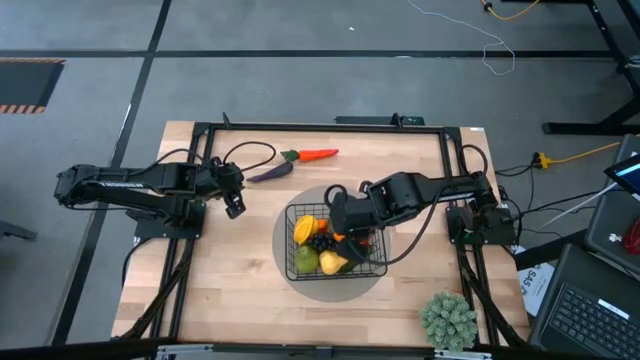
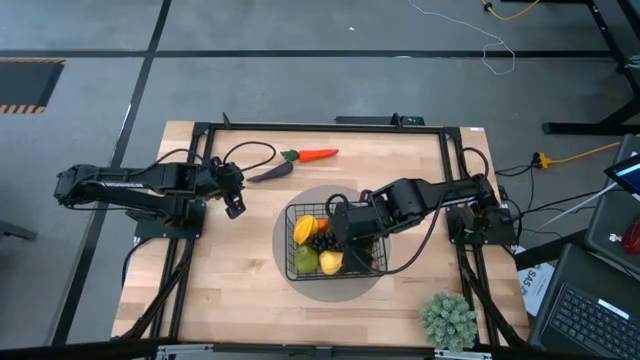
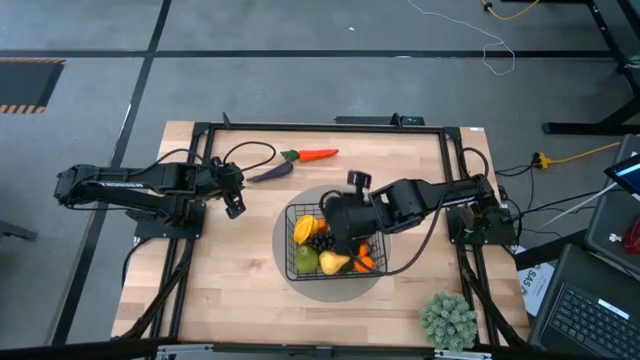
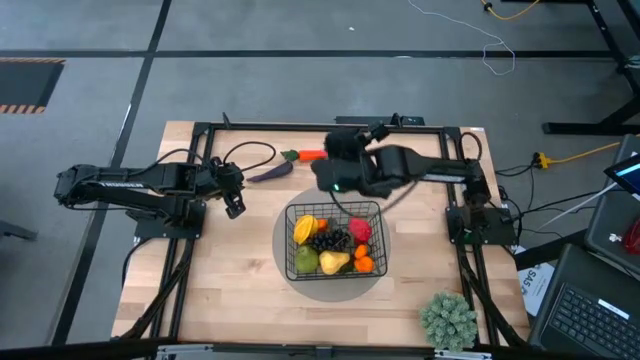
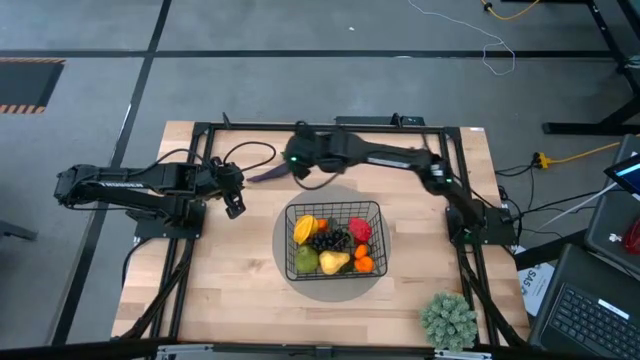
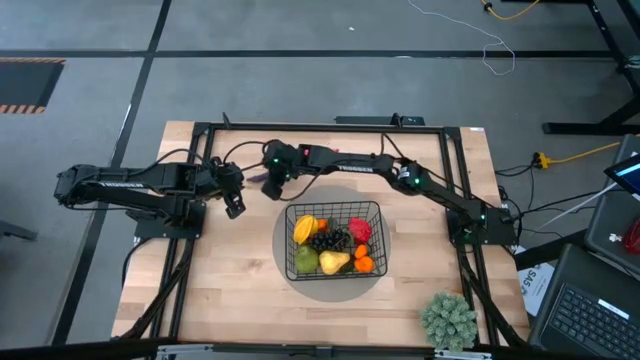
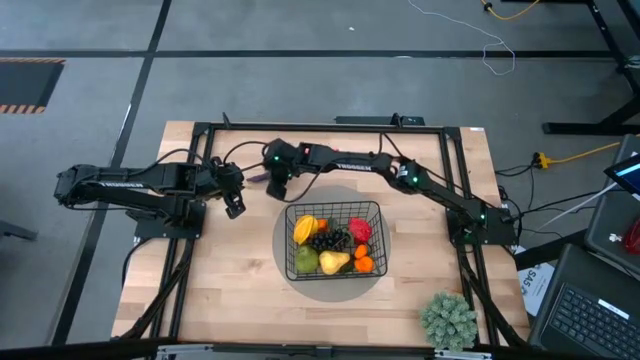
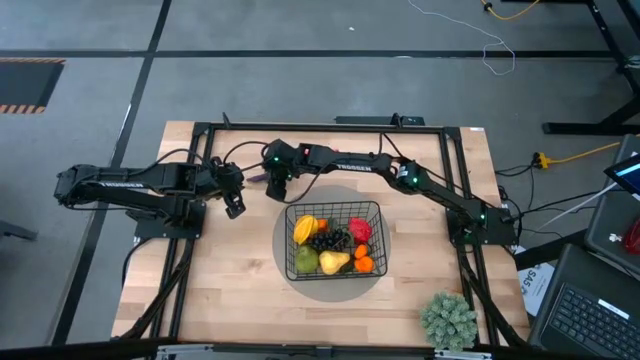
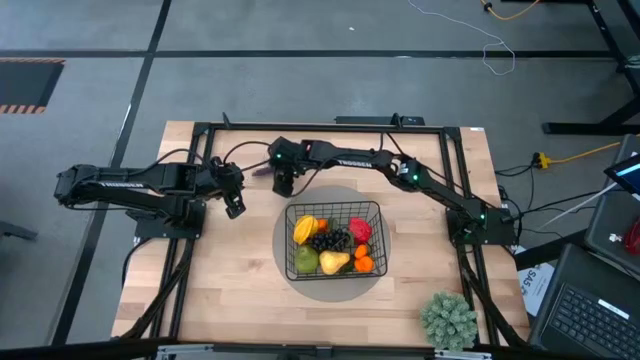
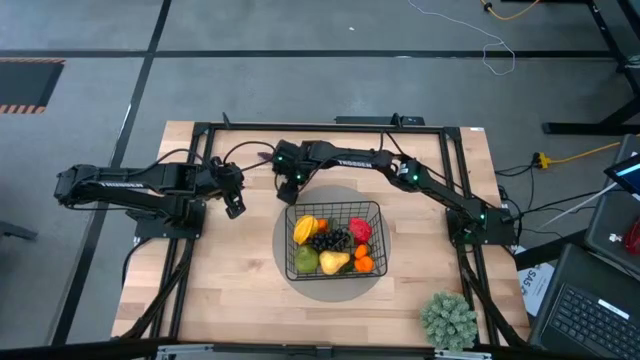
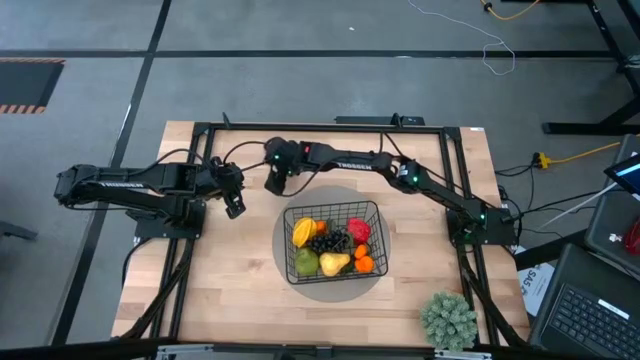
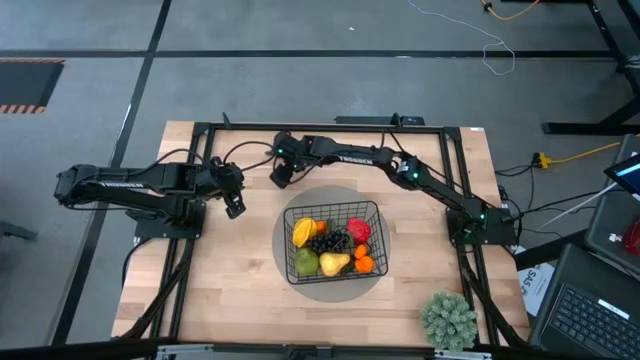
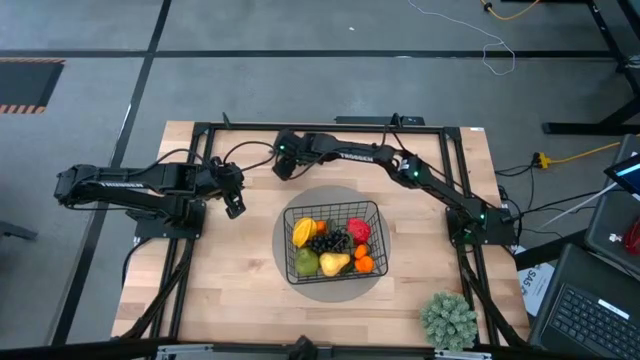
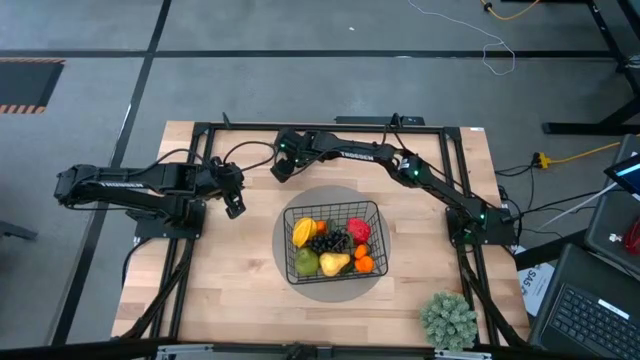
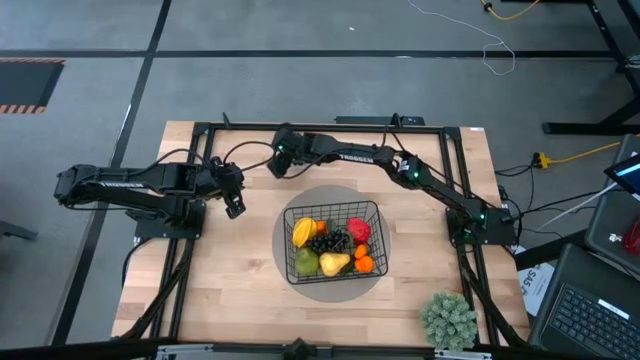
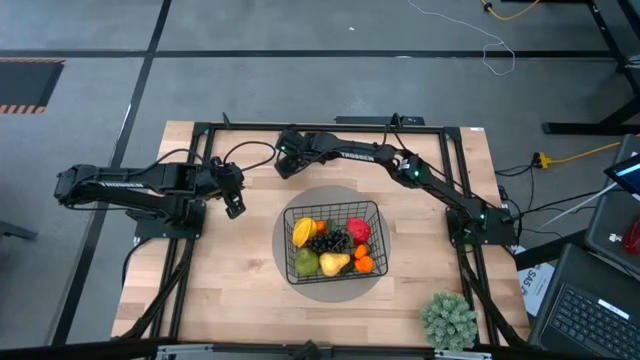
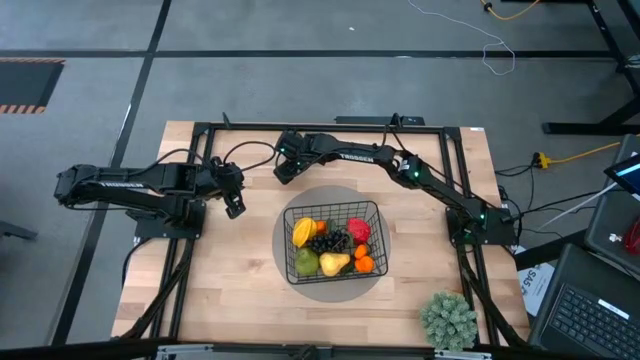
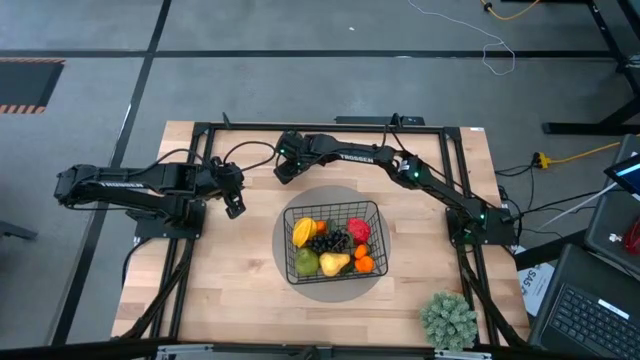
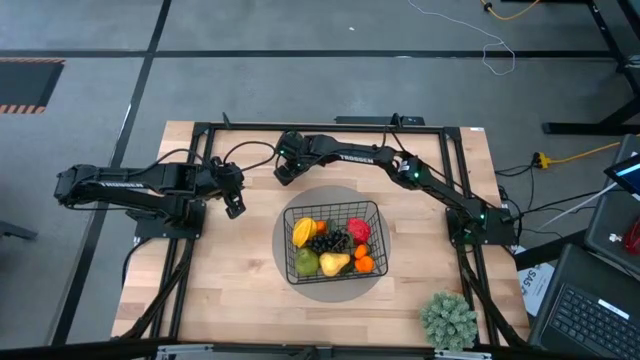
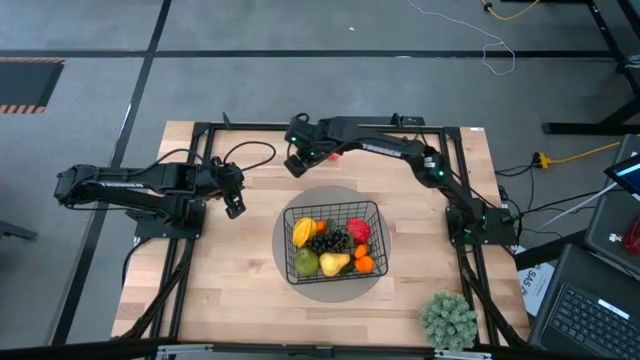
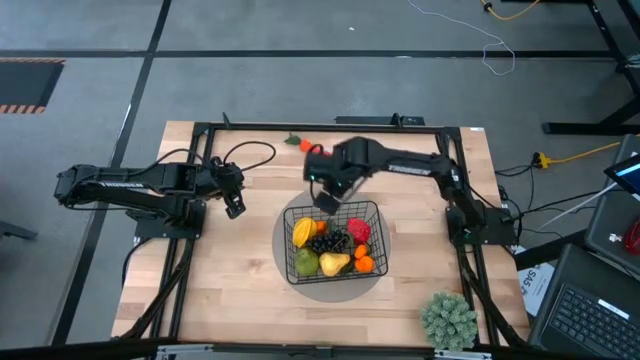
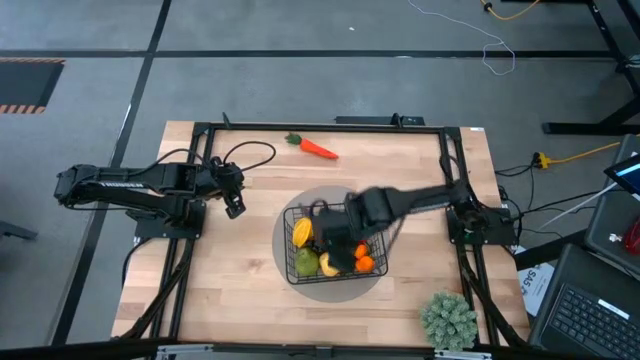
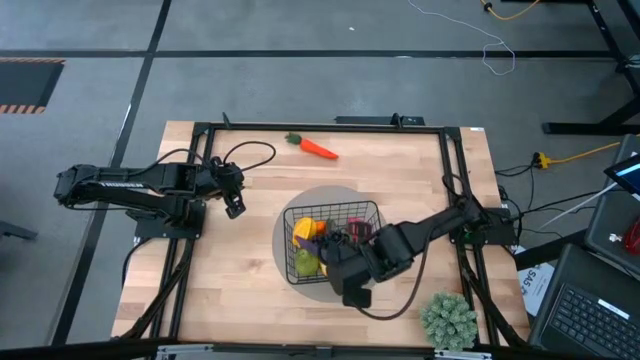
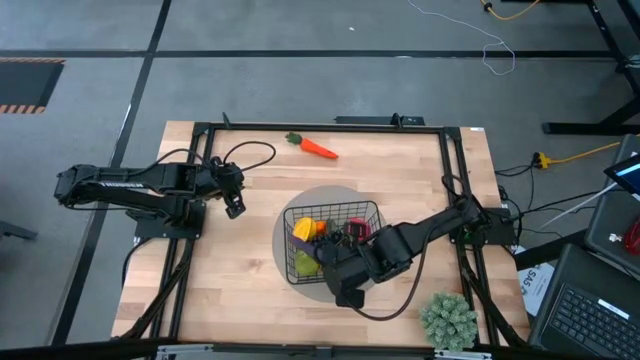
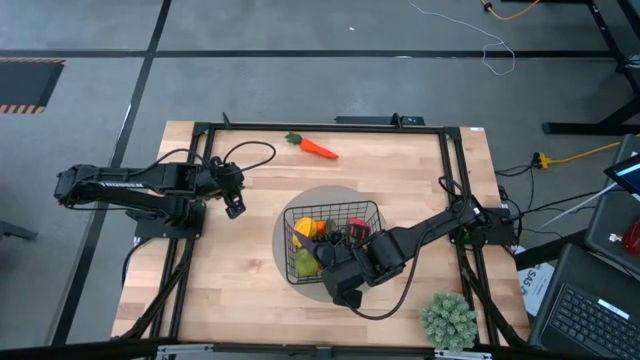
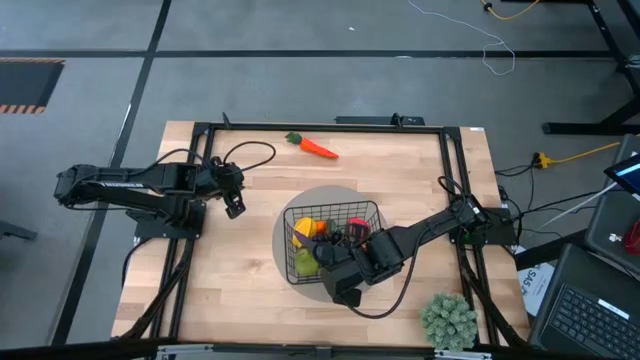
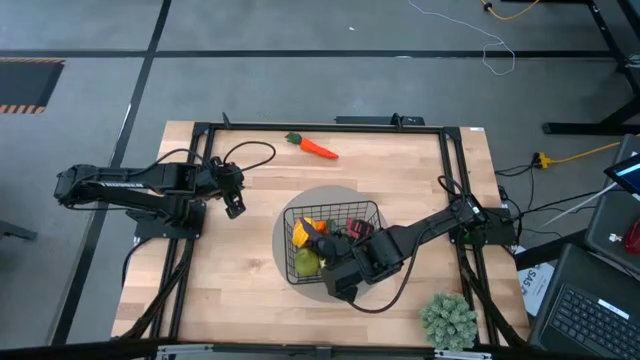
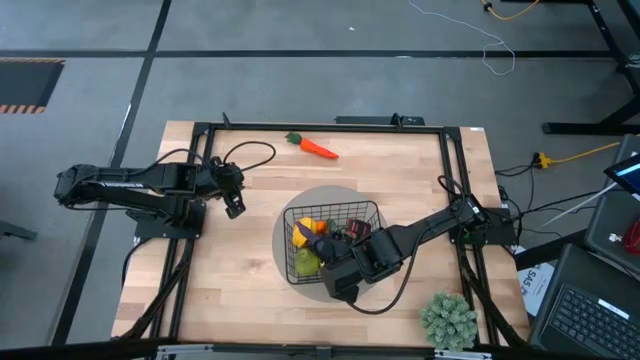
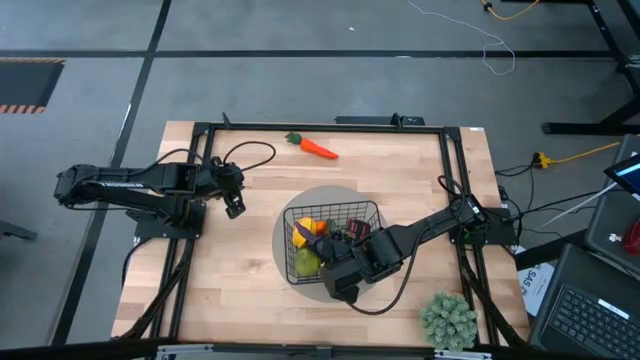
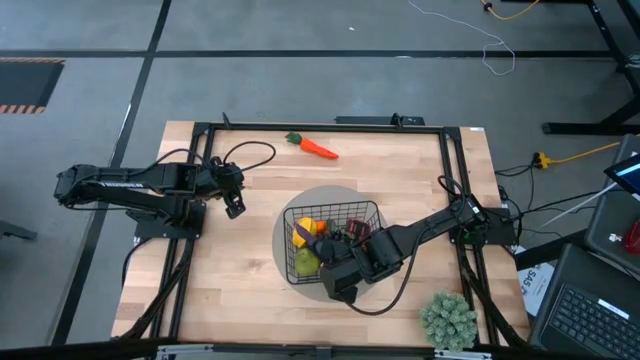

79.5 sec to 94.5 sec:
Task: Build produce basket
Put the violet eggplant into the black wire basket

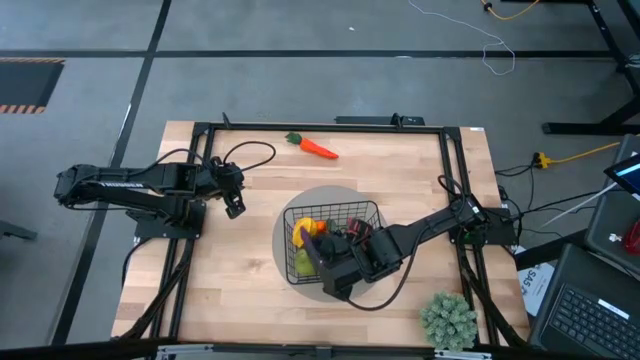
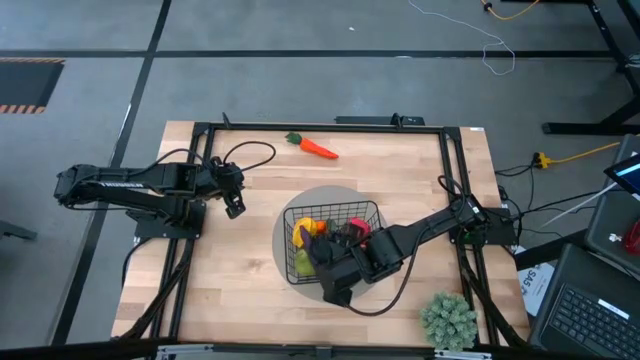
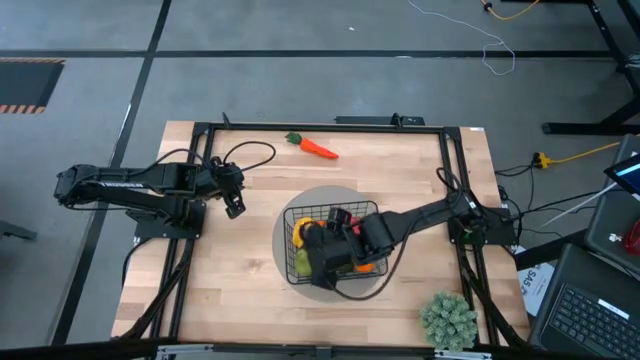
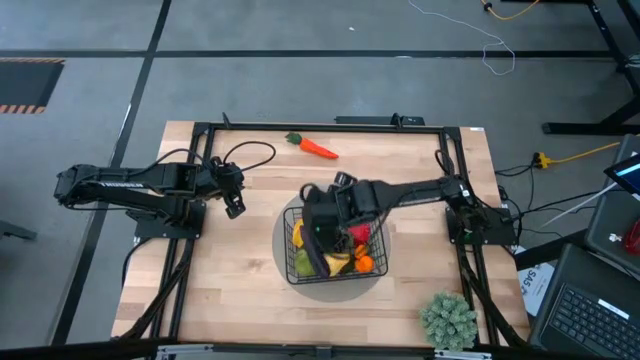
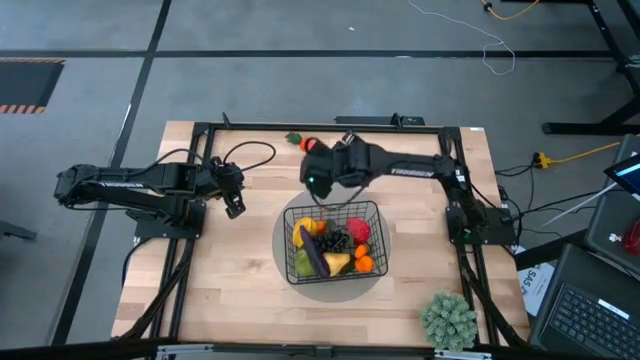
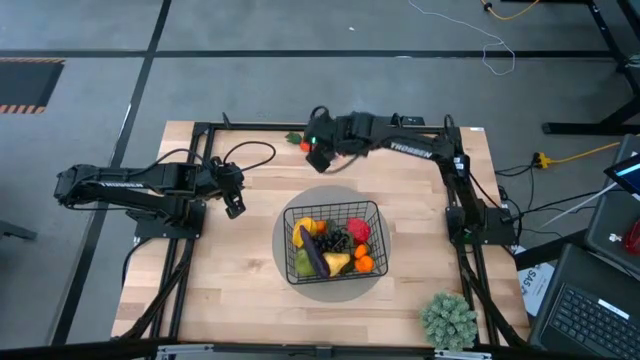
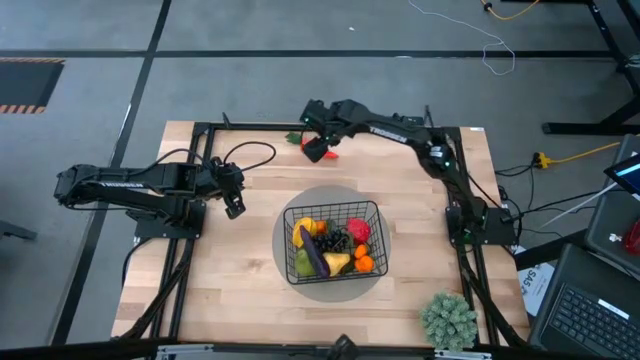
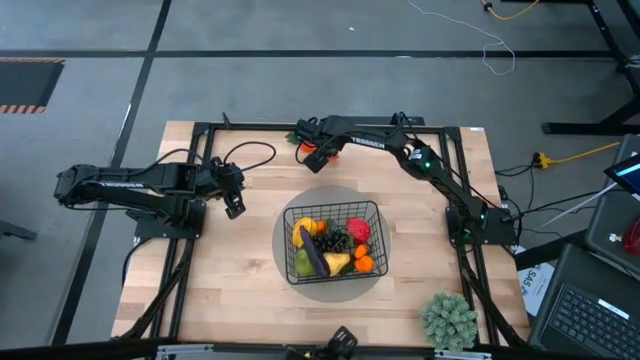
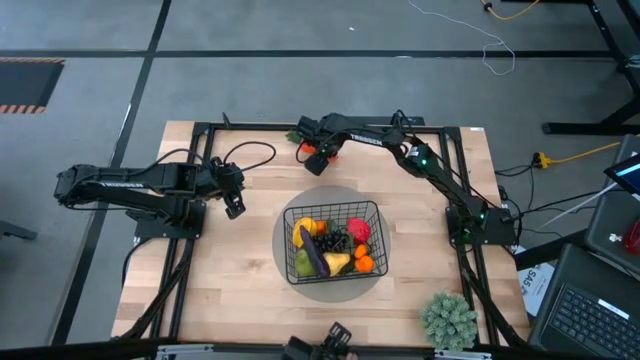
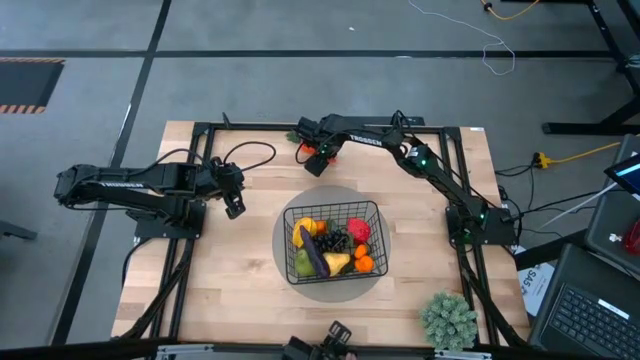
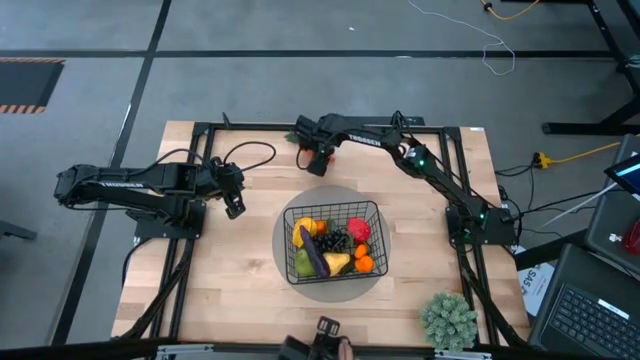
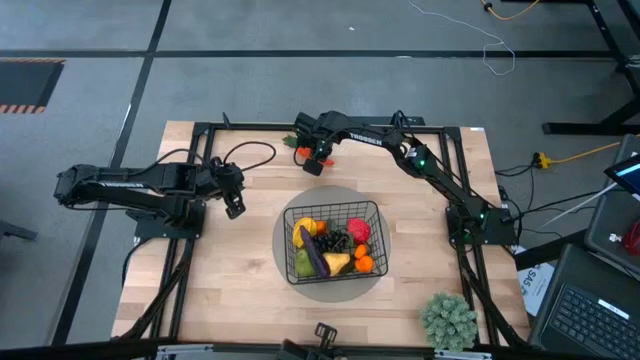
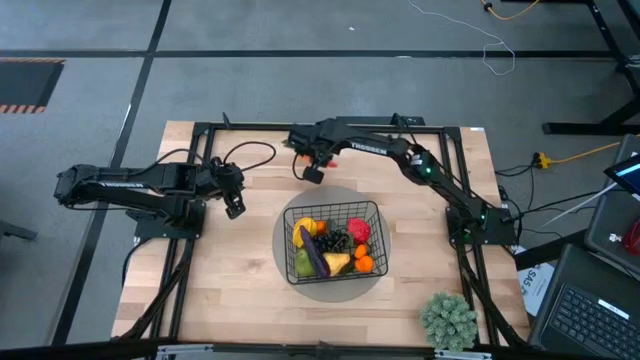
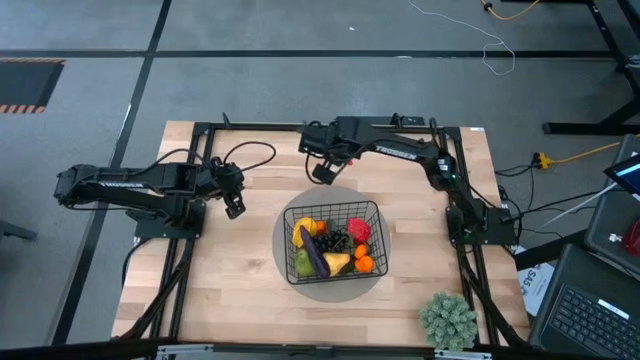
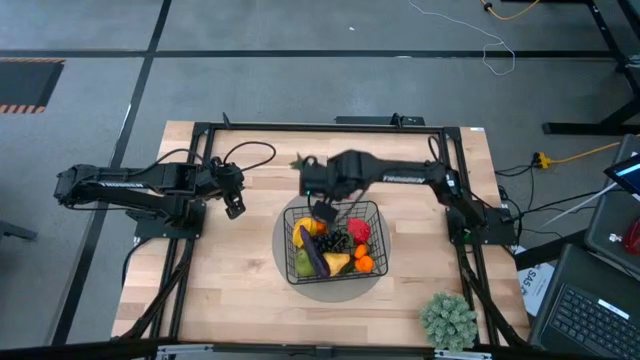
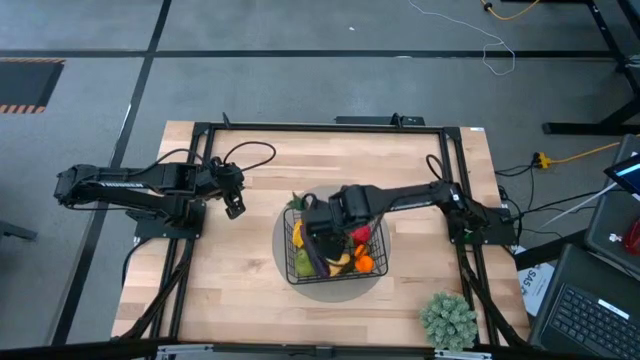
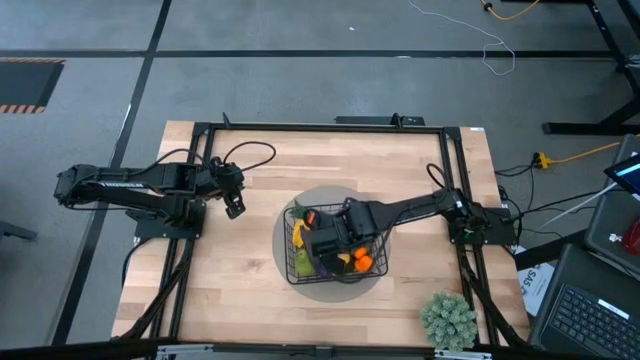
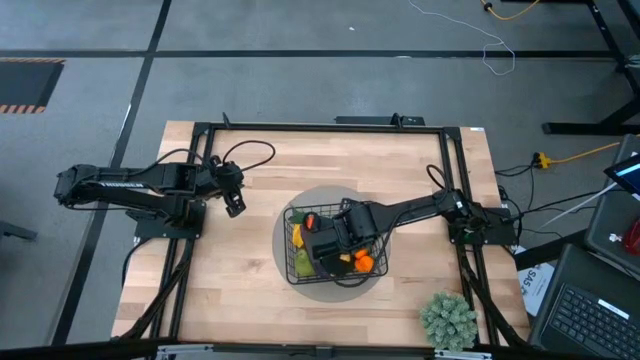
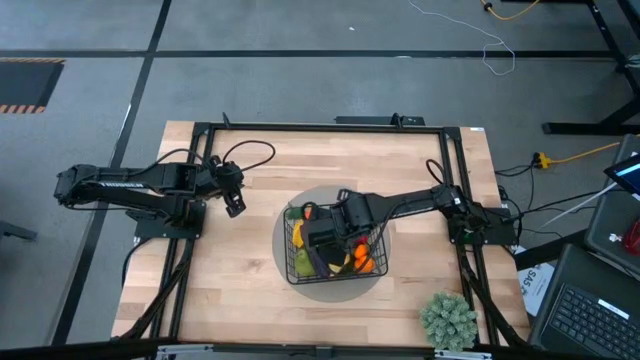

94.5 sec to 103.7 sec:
Put the orange carrot into the wire black basket
